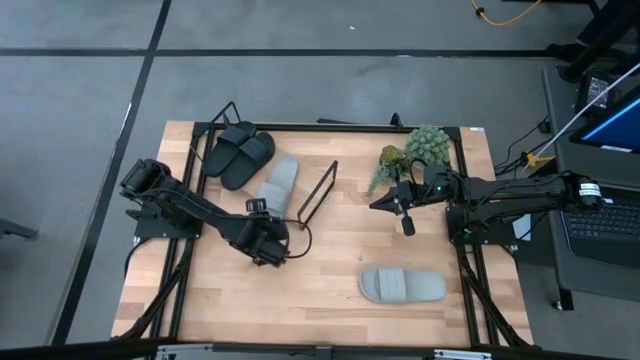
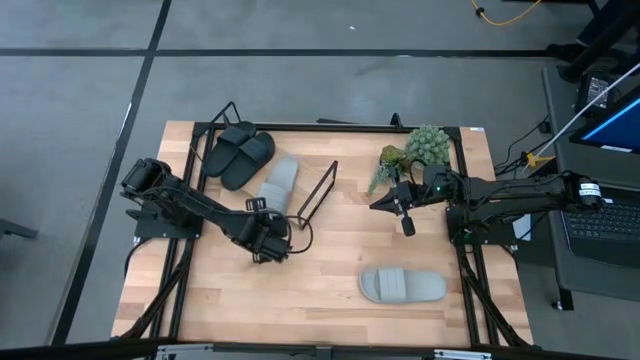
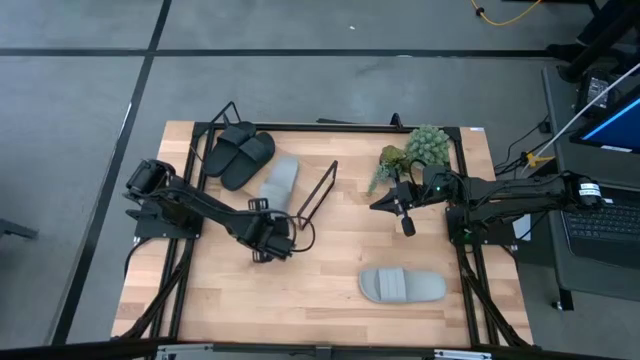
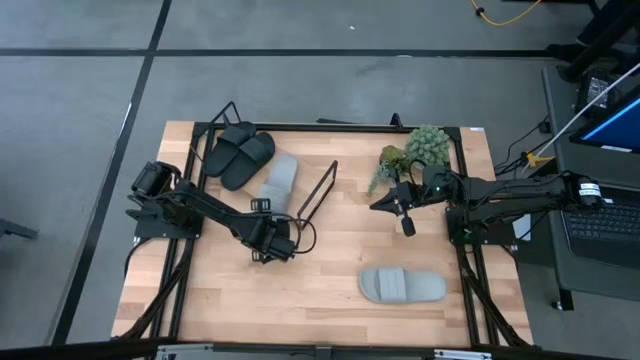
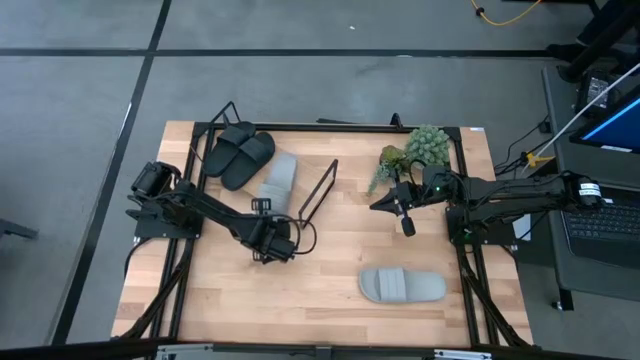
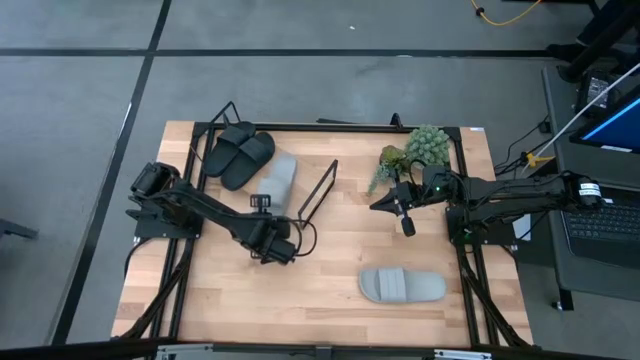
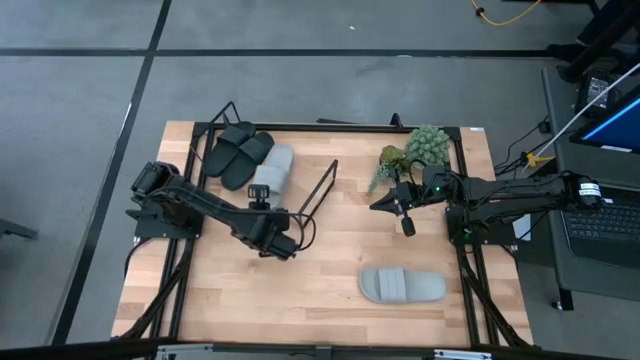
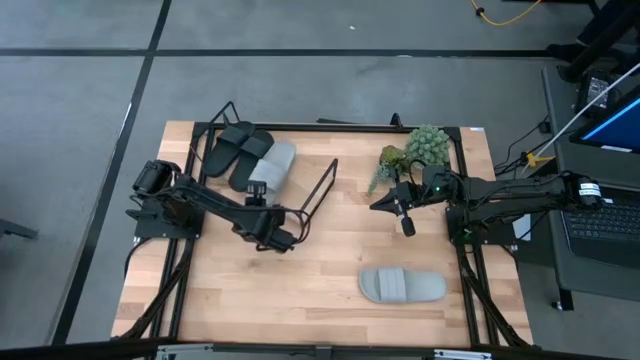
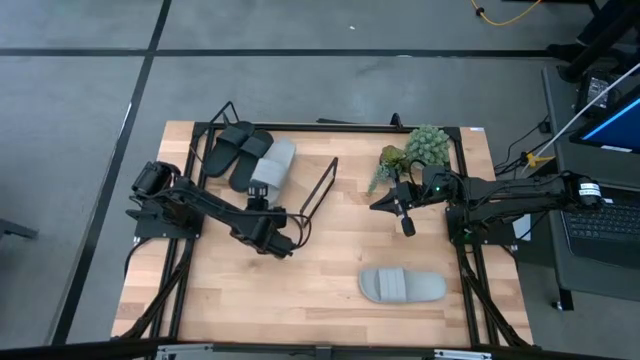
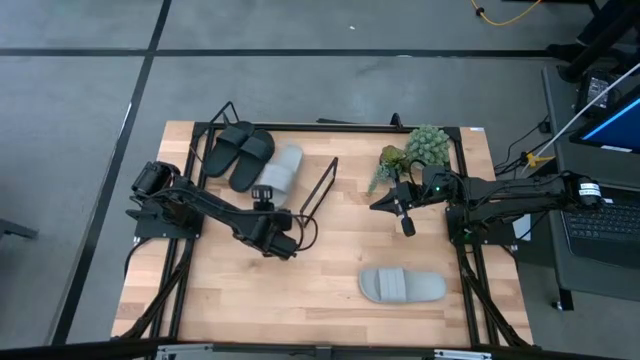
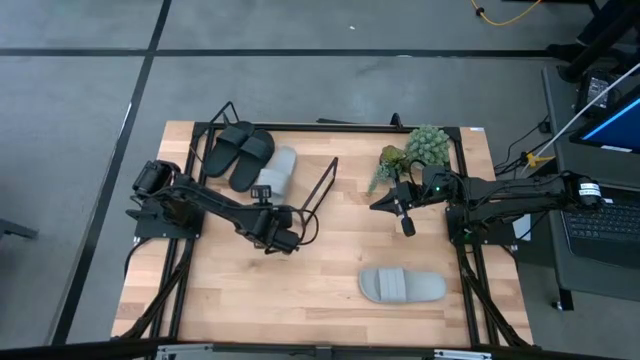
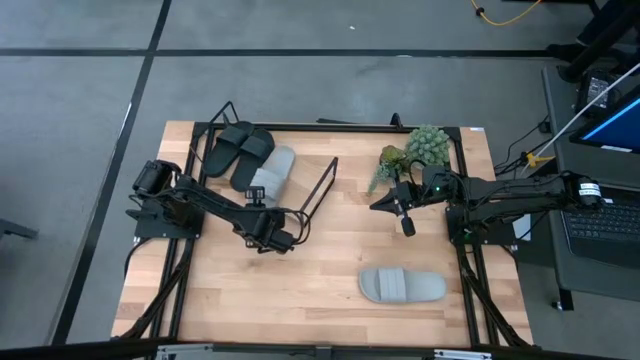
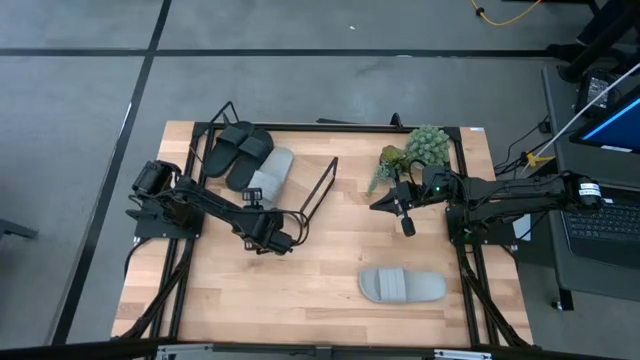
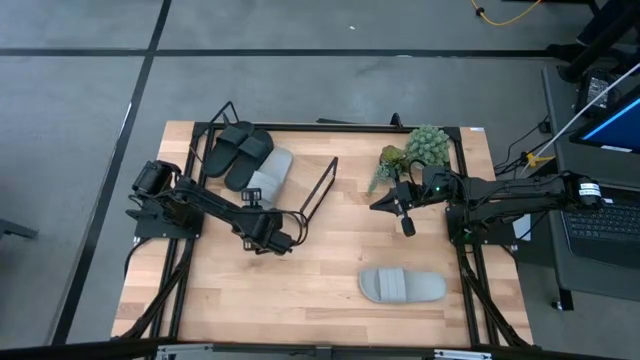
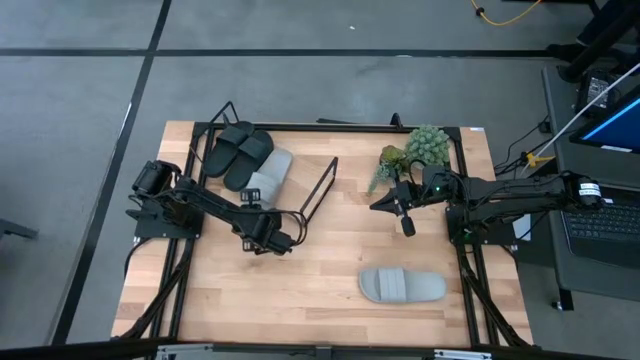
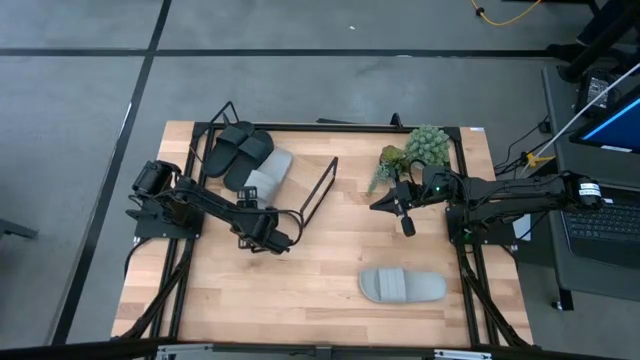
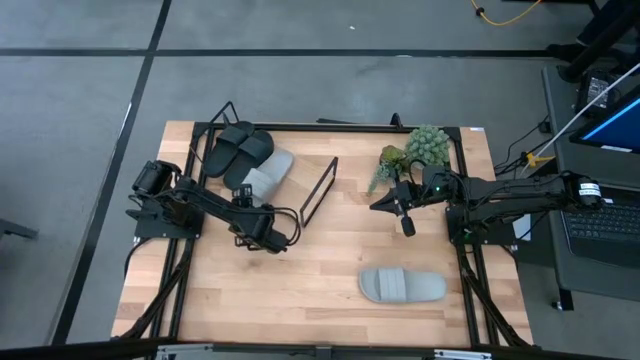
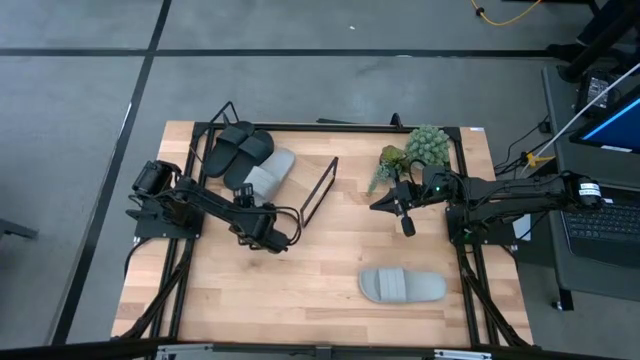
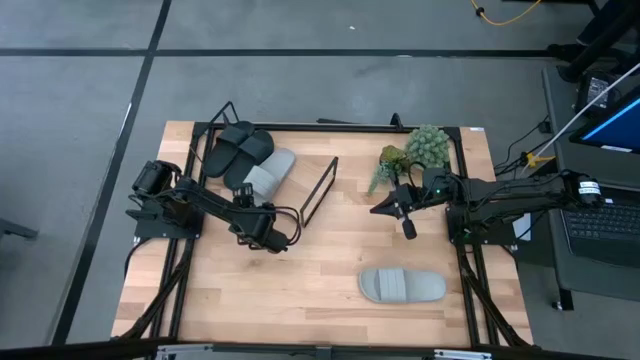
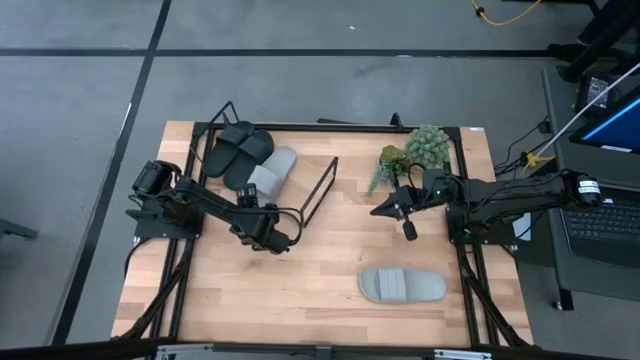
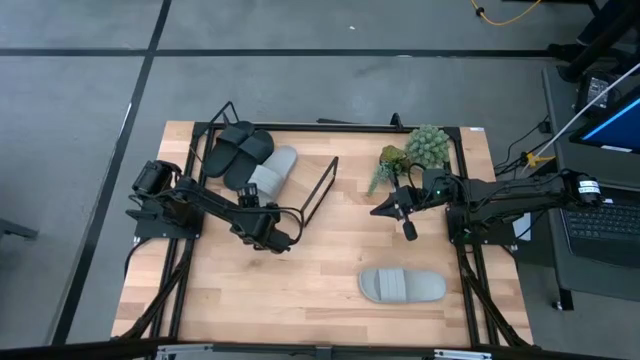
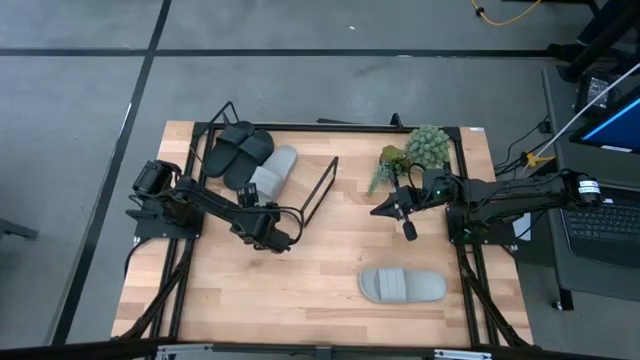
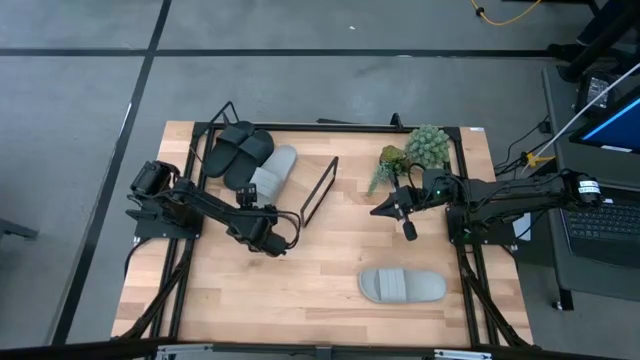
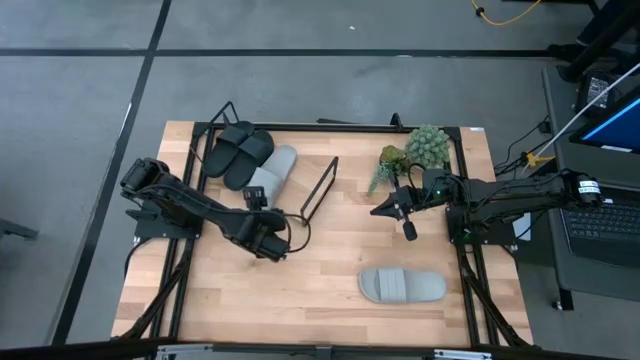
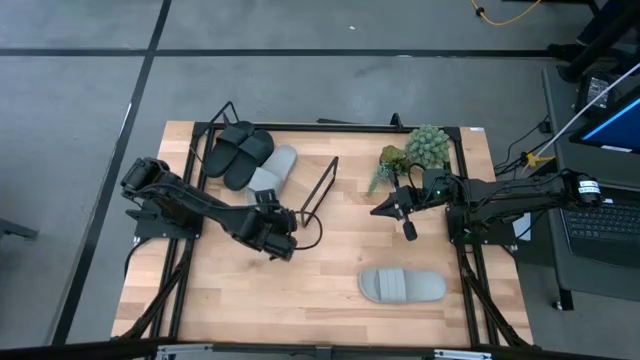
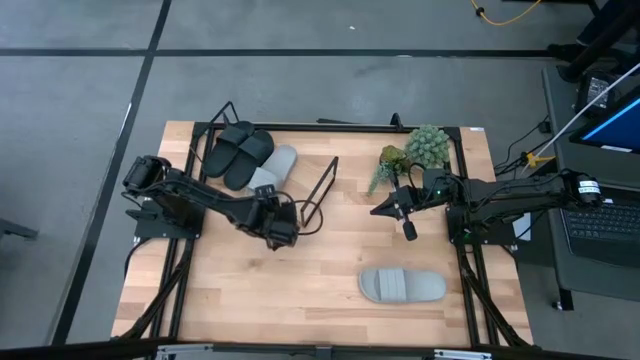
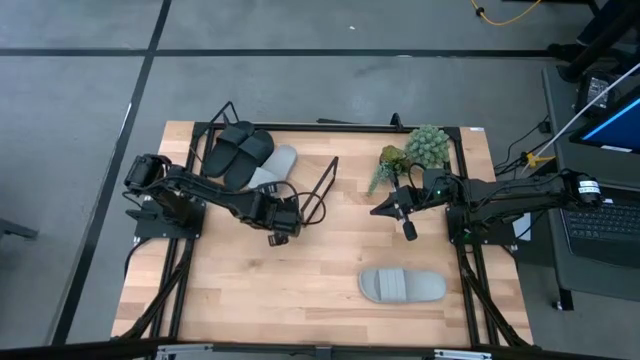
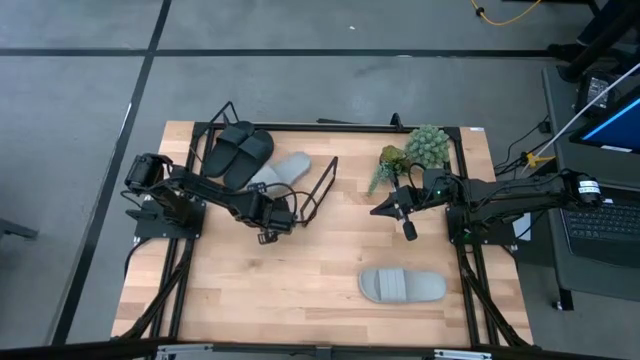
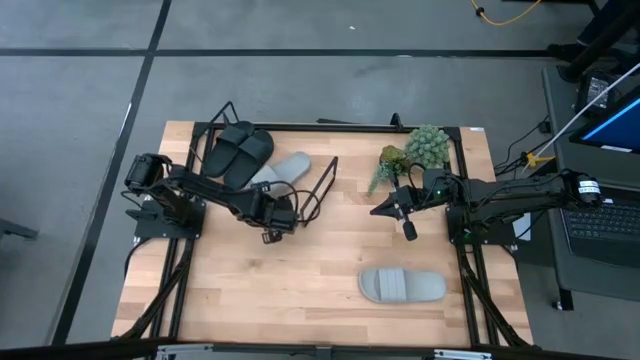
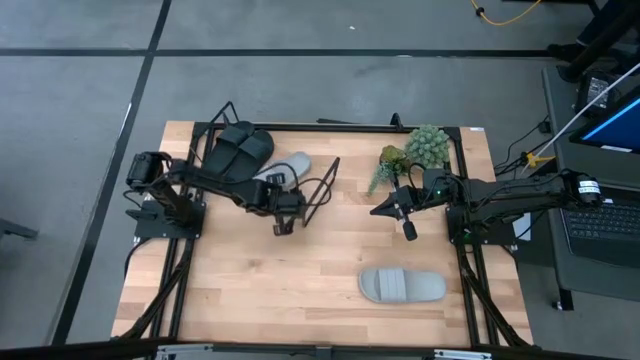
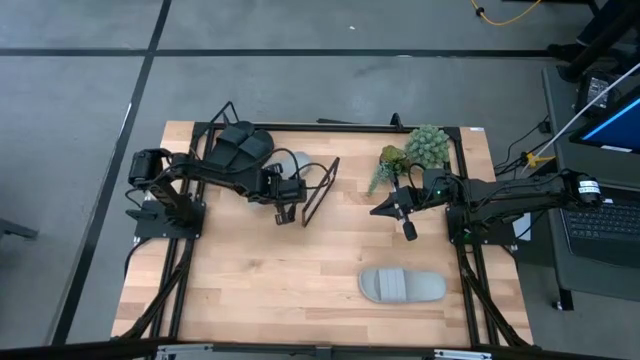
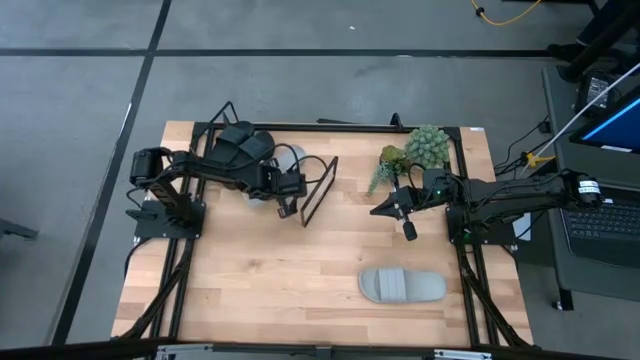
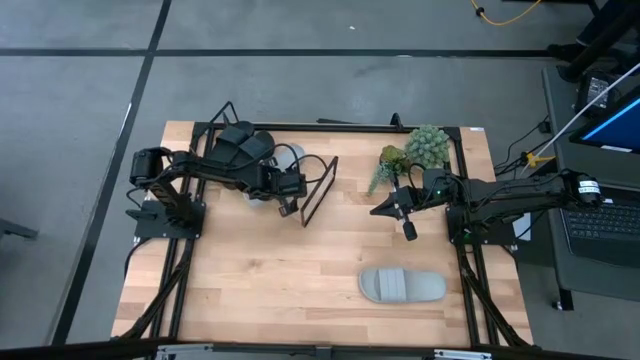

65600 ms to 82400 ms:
Task: Pick and place slides into the shelf
Put the top gray slipper on the shelf

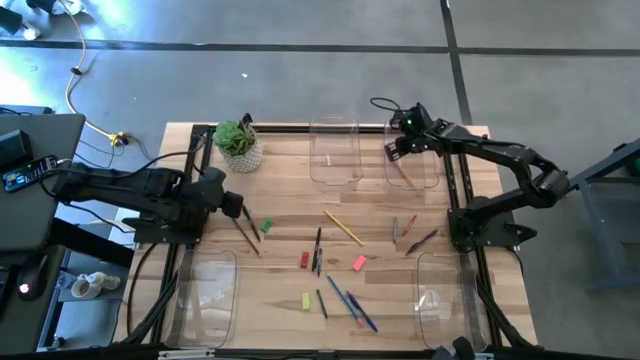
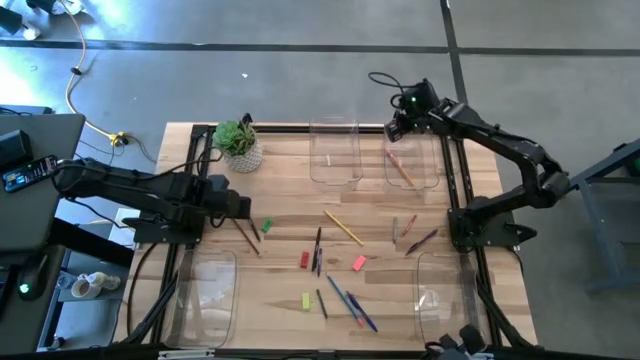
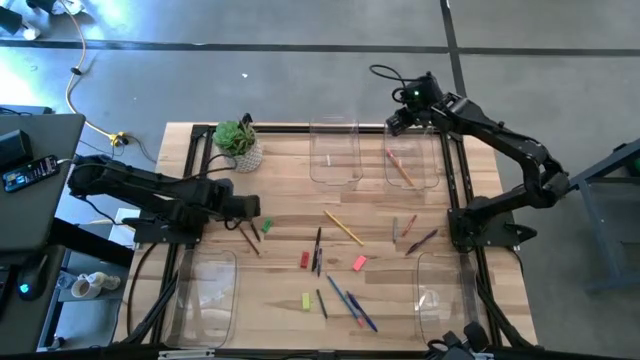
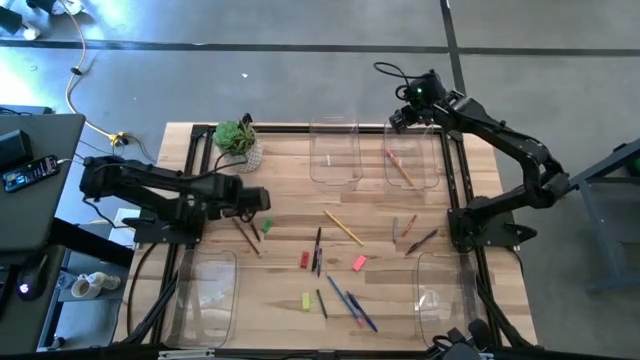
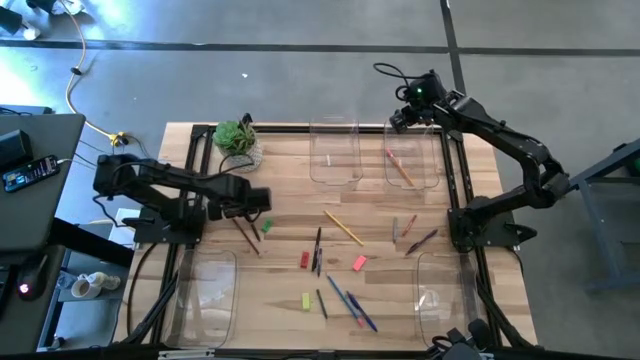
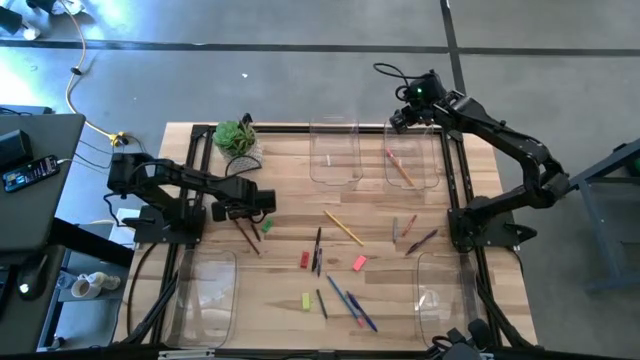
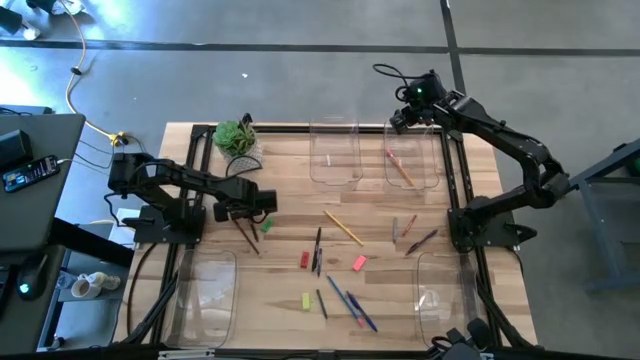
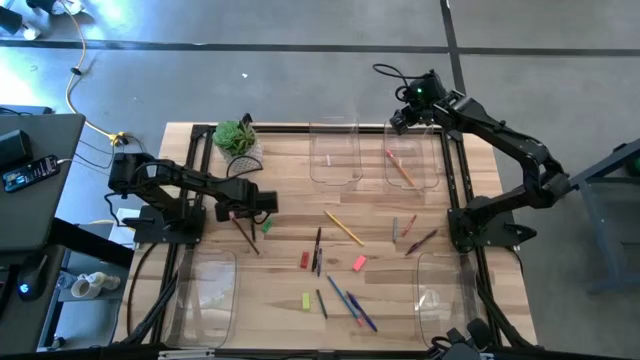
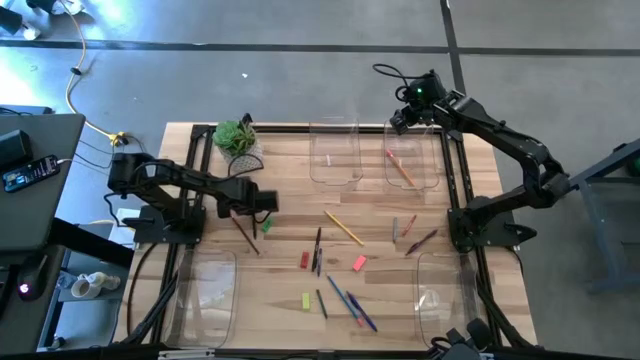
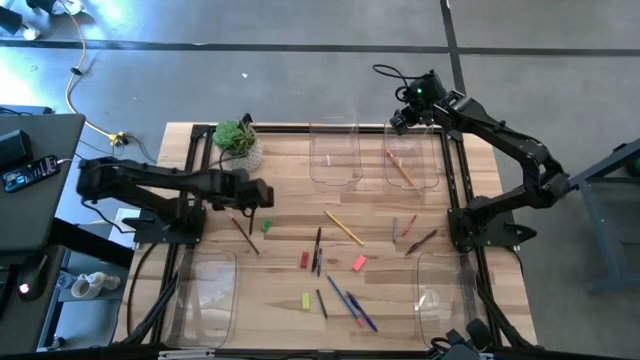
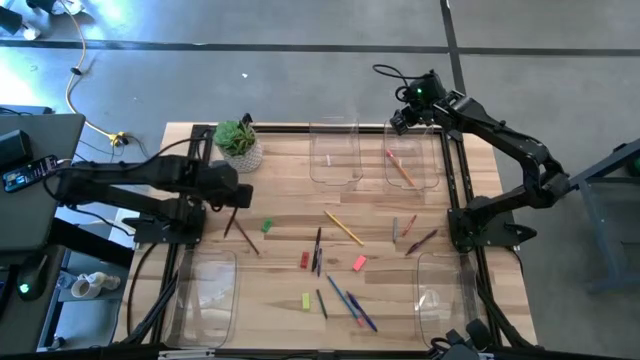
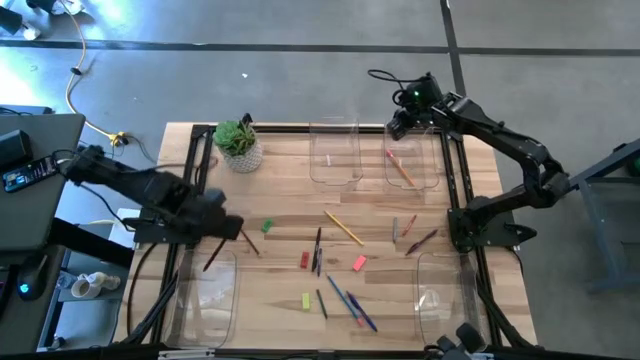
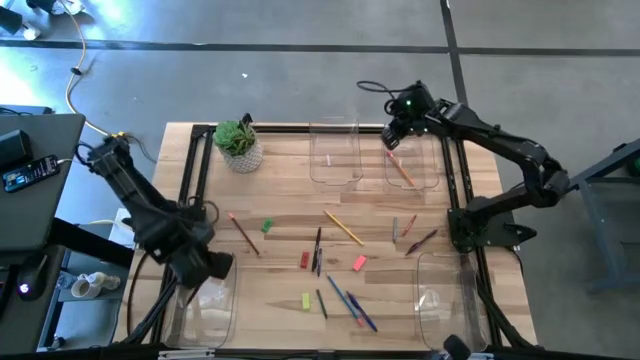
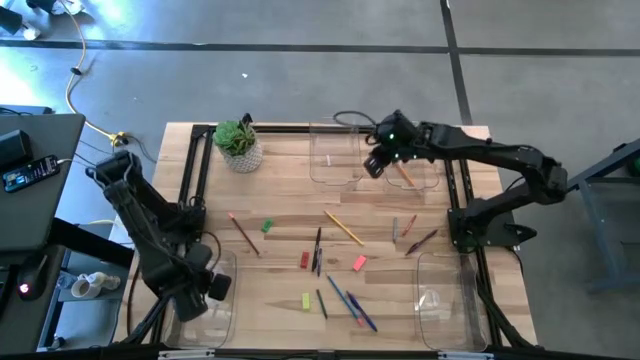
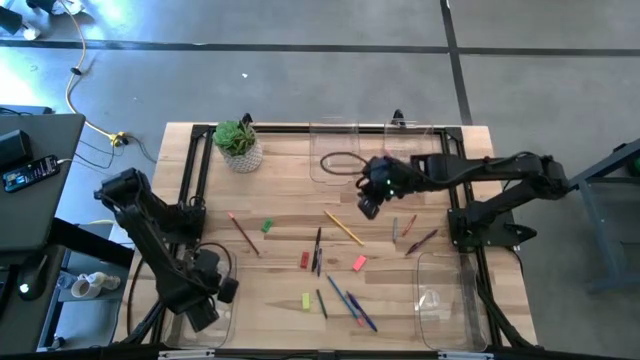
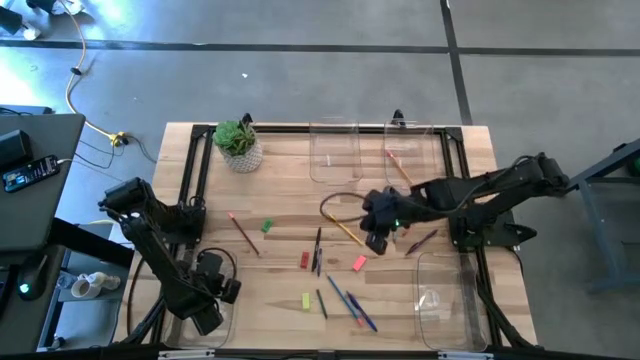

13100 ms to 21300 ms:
Task: Sort crayons/erasers/pens/pencils in bins
Put the top black pen into the bottom left transparent bin
